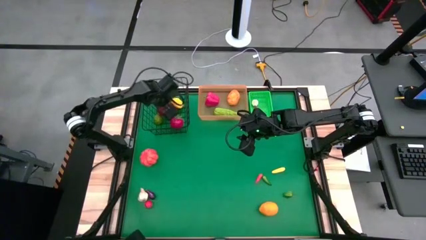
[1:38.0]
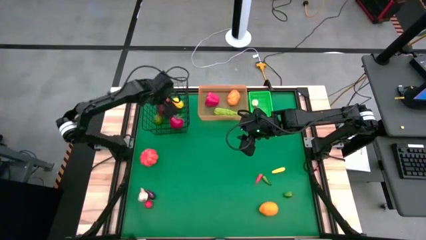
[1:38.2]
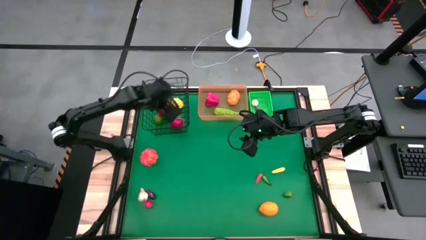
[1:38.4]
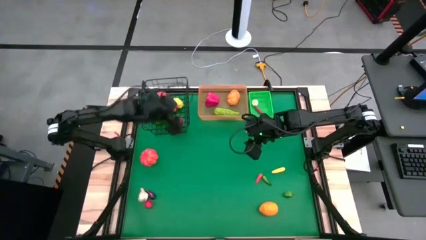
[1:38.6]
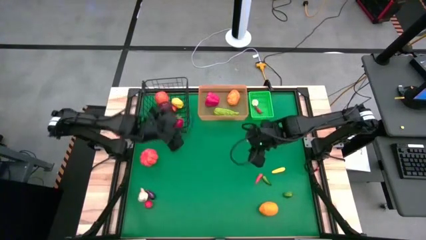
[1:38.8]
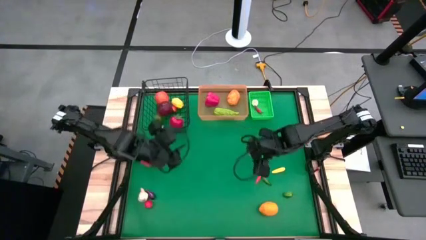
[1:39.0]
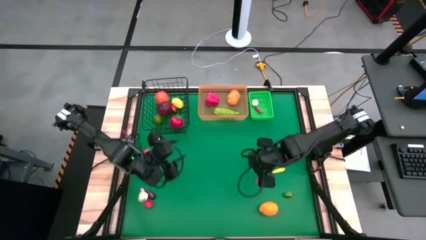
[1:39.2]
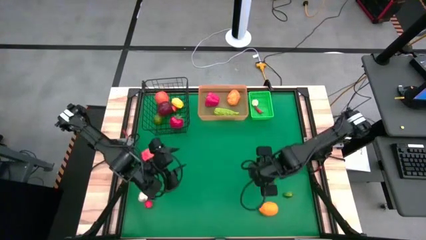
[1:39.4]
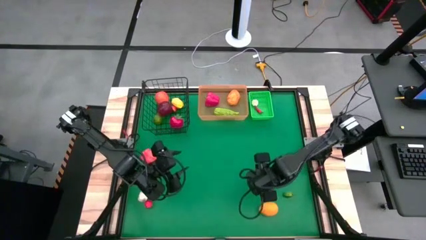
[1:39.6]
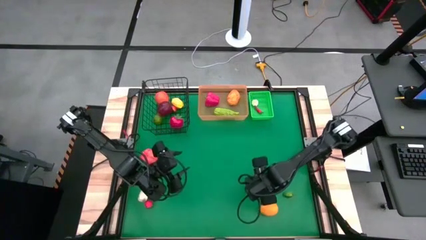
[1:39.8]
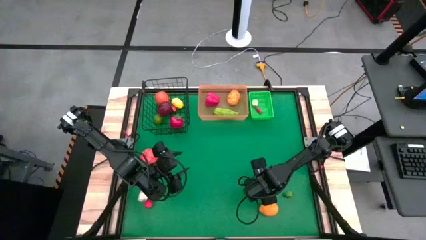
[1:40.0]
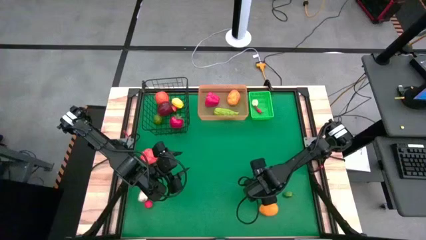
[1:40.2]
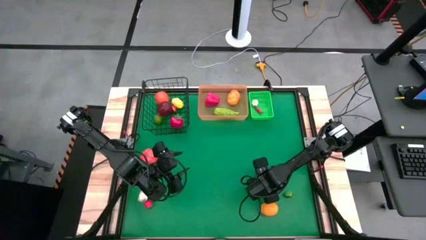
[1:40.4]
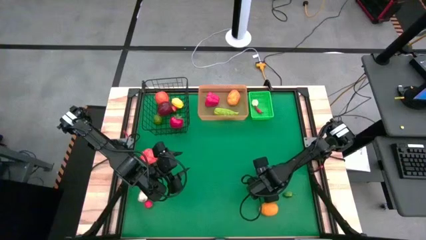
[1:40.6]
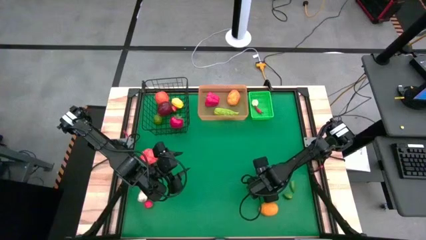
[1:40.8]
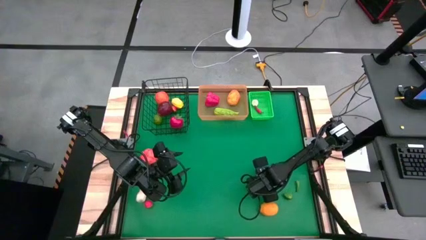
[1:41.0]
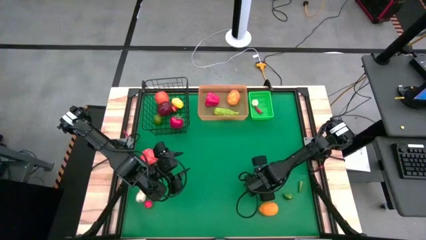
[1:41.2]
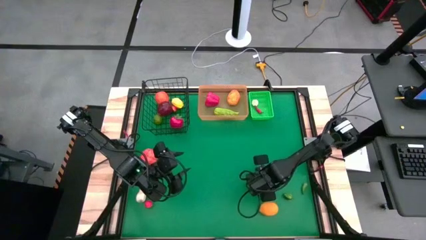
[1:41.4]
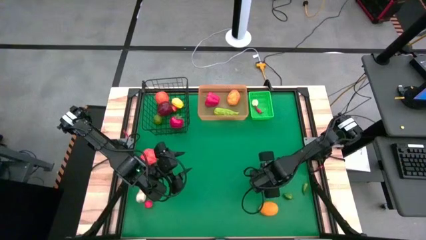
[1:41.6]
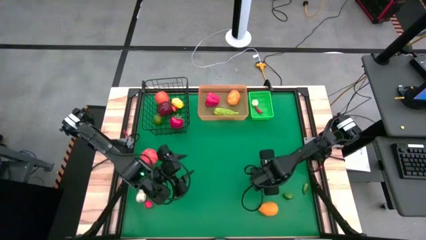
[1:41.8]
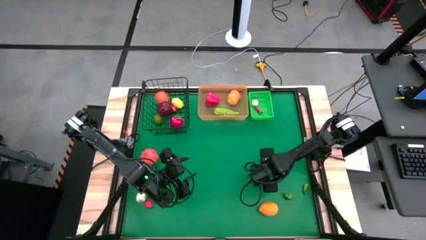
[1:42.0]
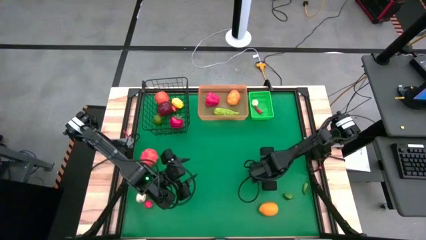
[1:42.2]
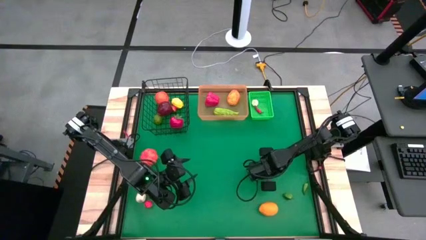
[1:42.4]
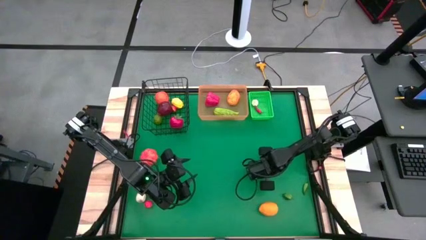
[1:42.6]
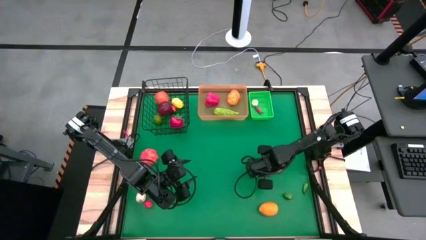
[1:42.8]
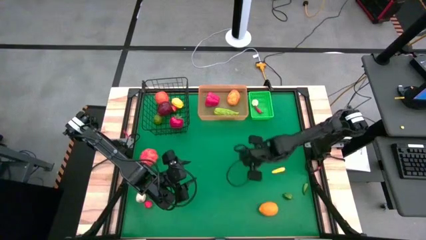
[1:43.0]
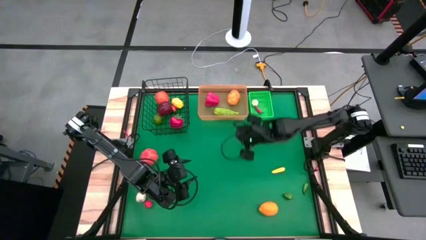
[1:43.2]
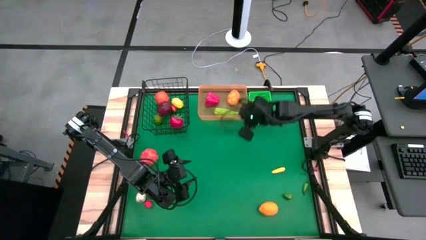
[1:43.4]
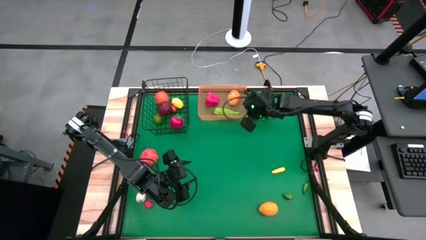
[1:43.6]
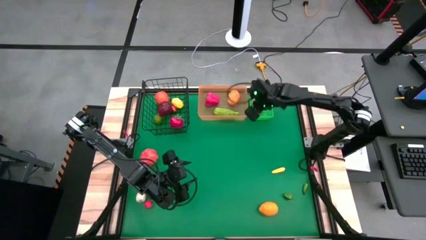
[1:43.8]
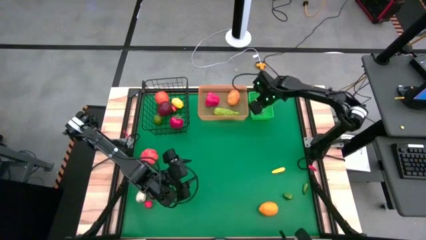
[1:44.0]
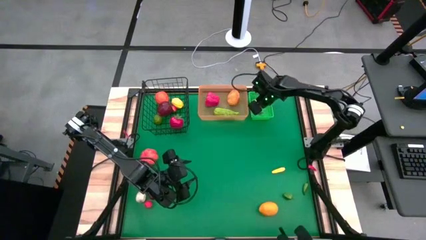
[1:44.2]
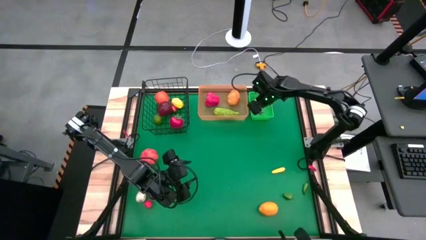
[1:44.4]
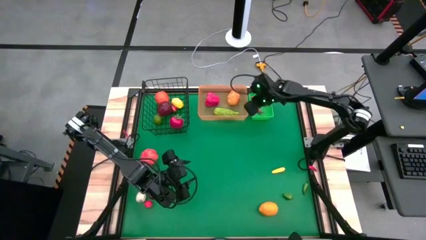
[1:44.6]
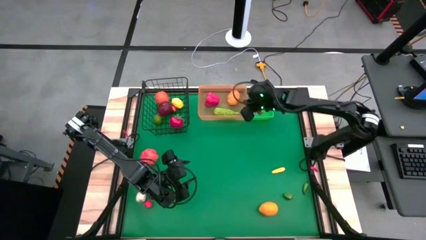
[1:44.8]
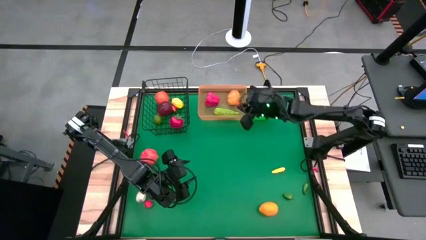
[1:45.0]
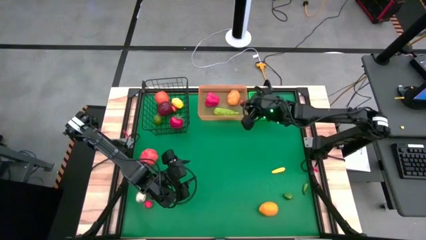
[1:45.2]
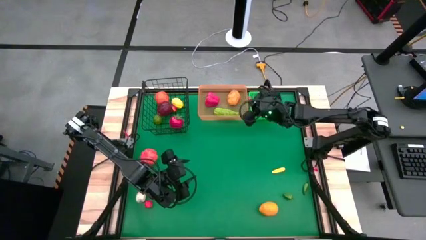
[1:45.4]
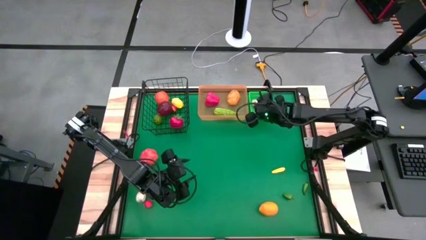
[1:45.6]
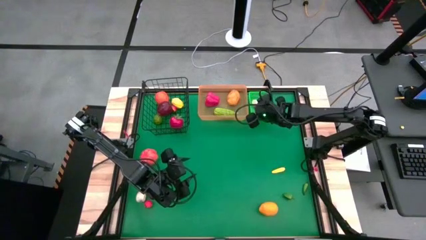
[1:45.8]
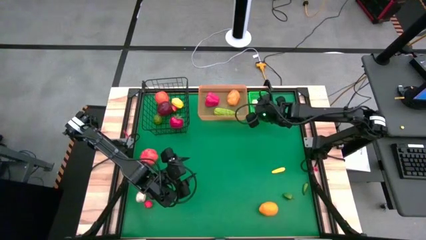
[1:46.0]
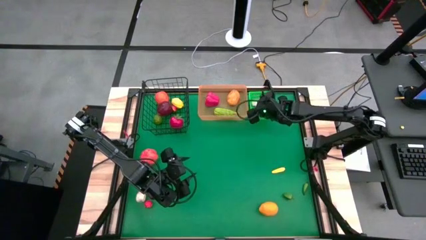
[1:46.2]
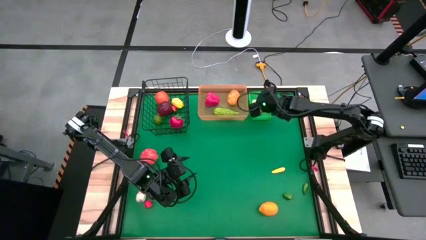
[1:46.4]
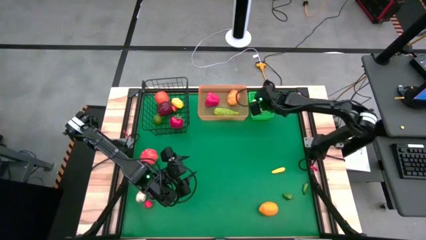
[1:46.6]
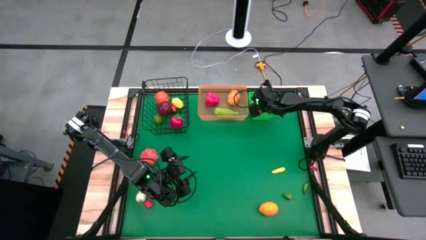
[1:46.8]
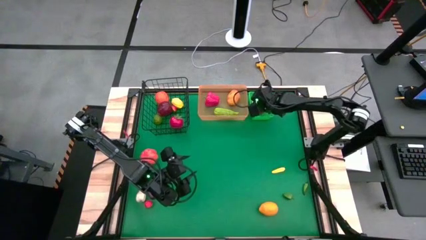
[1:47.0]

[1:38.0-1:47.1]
Task: Sort produce into baskets
Put the orange chili pepper into the green basket

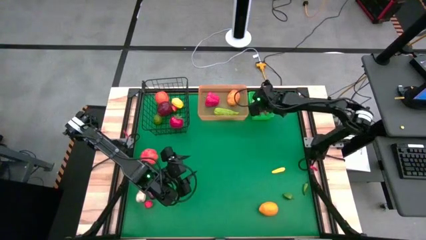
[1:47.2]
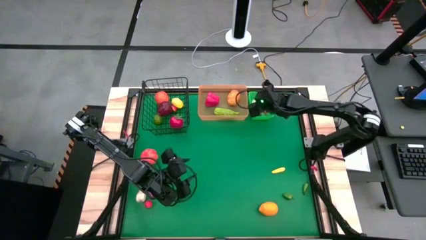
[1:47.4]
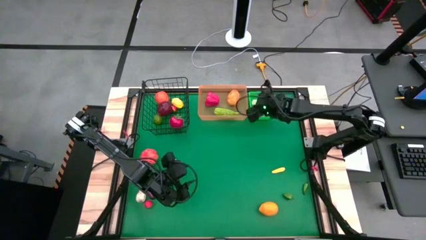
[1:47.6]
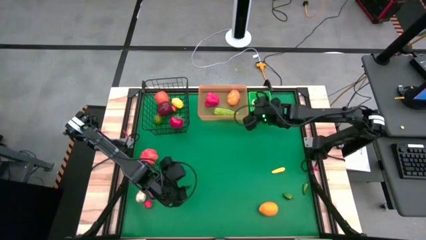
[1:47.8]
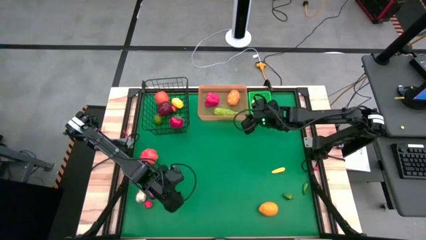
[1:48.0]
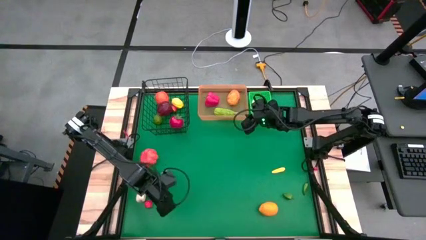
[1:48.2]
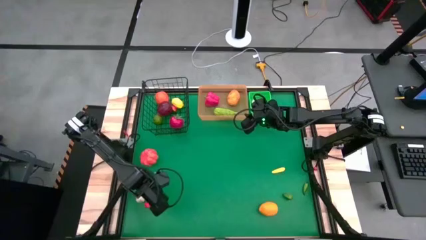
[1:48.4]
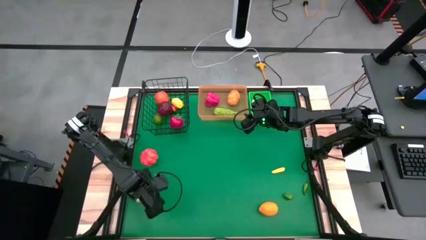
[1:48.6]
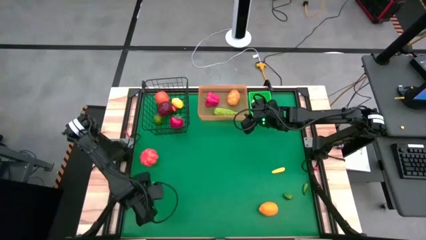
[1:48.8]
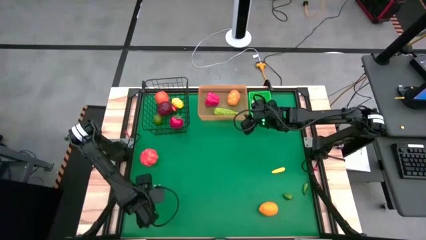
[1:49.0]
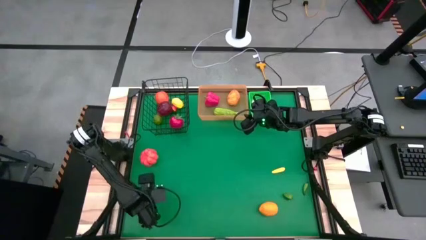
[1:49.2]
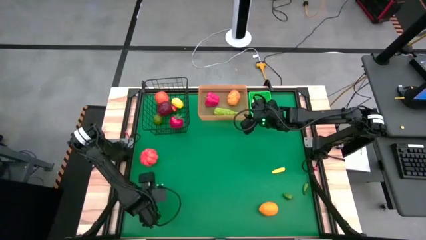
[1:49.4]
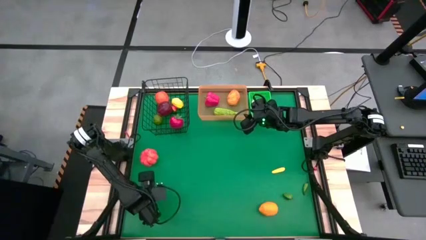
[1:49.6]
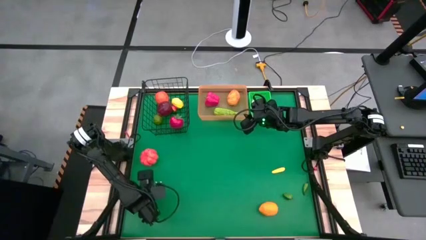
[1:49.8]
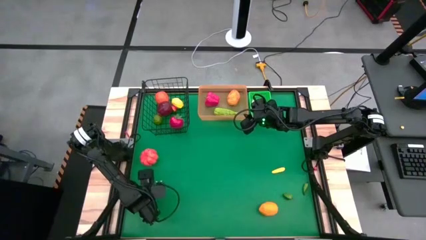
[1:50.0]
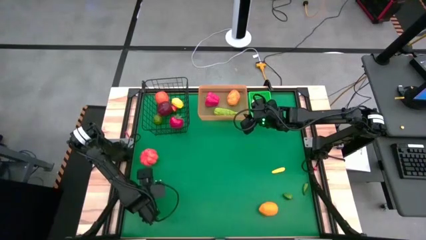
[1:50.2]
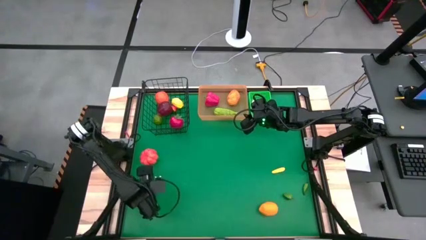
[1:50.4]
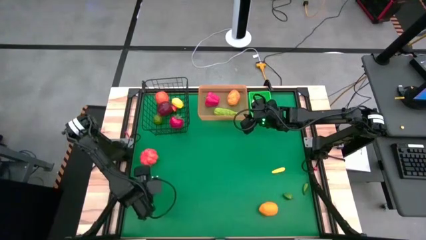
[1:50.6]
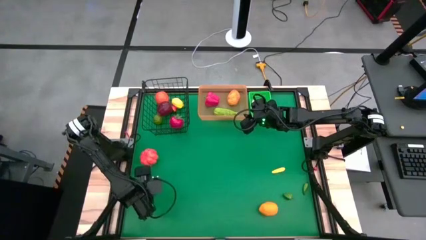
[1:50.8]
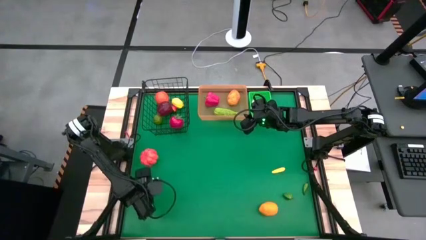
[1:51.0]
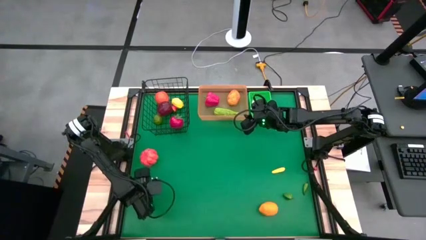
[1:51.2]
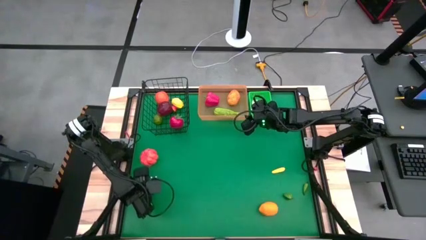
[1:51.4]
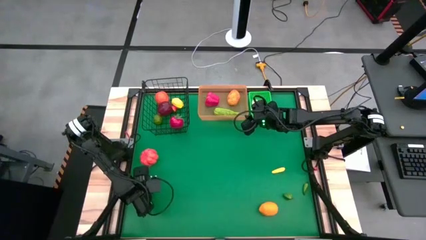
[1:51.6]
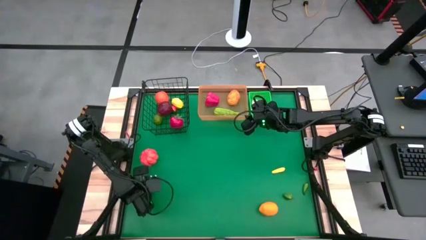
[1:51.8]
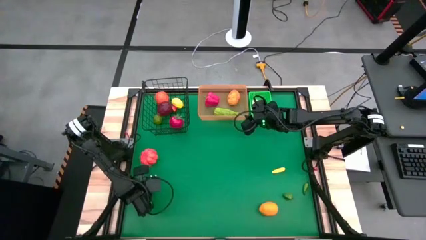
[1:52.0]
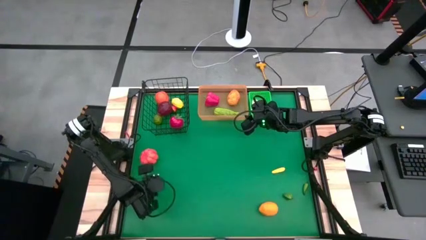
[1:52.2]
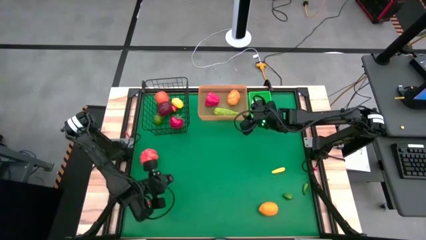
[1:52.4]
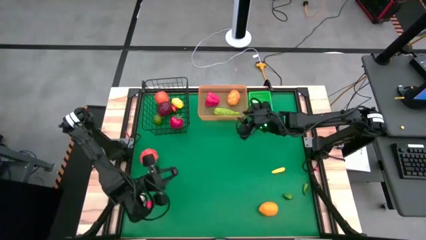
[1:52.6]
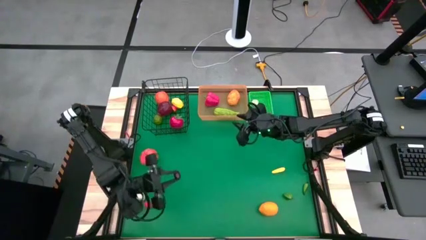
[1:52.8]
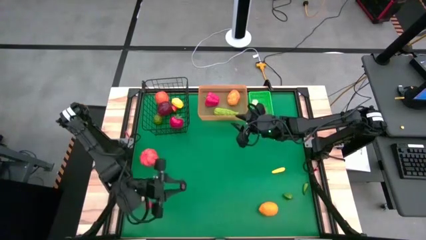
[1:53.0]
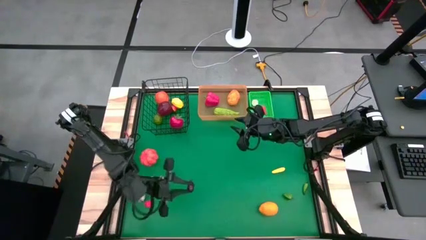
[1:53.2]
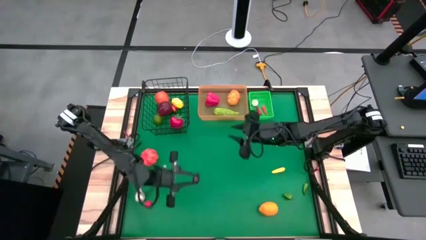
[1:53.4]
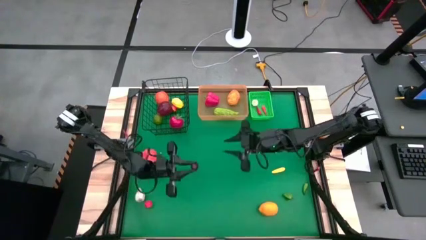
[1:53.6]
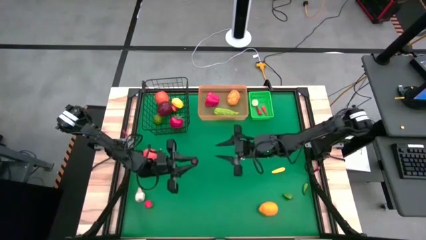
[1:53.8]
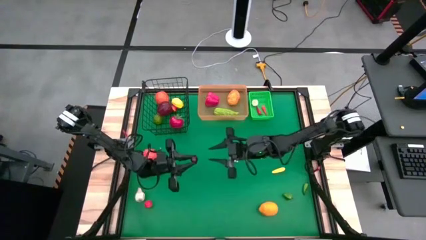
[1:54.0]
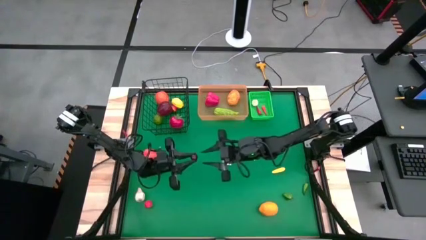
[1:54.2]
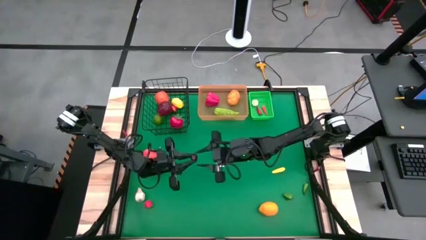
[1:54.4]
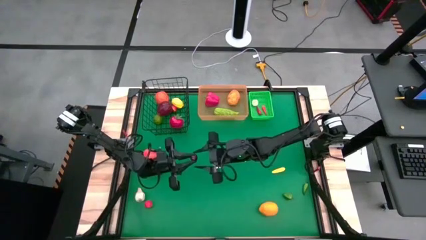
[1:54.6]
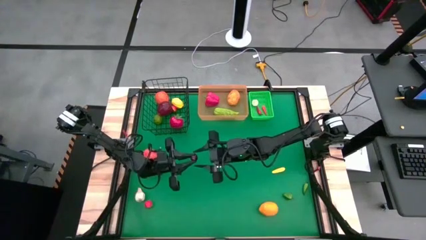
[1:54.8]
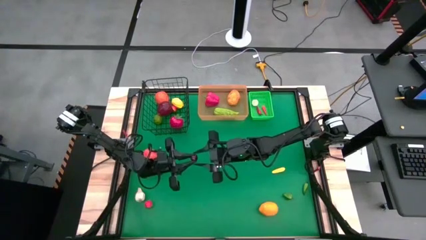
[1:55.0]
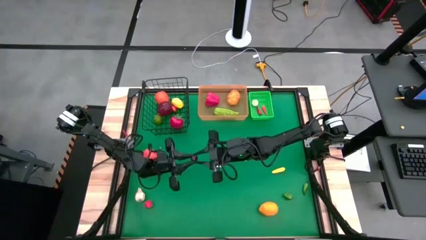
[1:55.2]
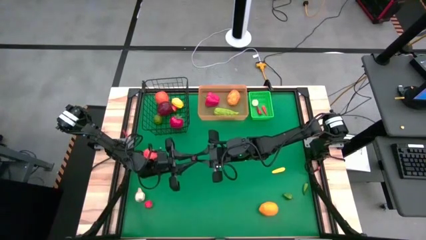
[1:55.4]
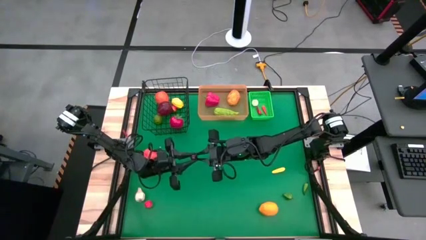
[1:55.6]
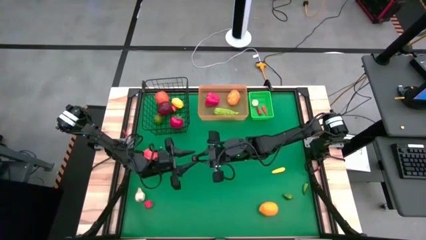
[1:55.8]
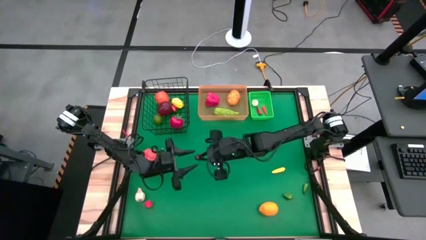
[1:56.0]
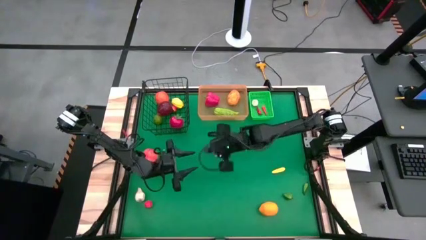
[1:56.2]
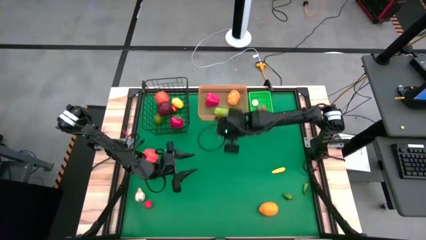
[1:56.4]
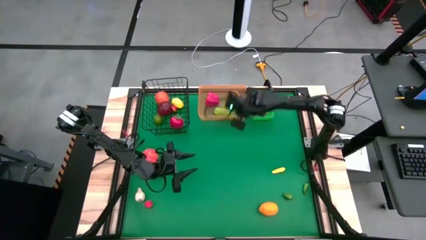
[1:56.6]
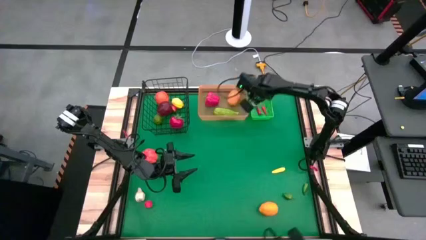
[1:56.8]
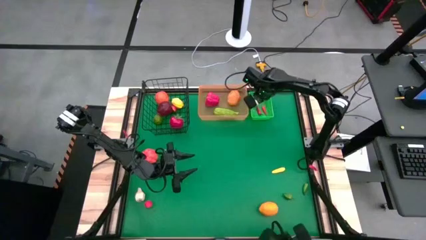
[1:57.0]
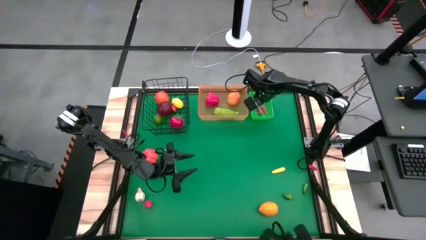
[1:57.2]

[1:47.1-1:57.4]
Put the purple eggplant into the green basket
